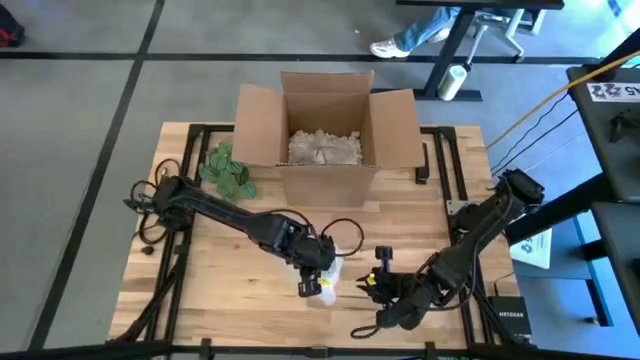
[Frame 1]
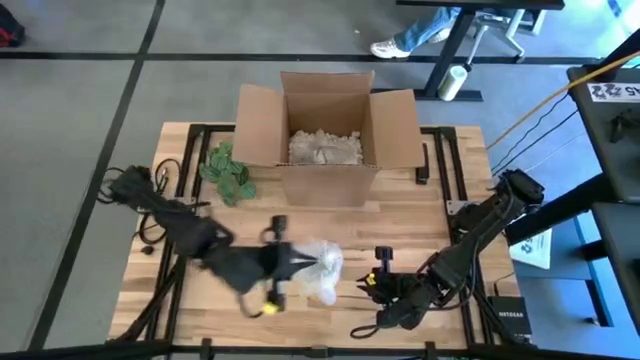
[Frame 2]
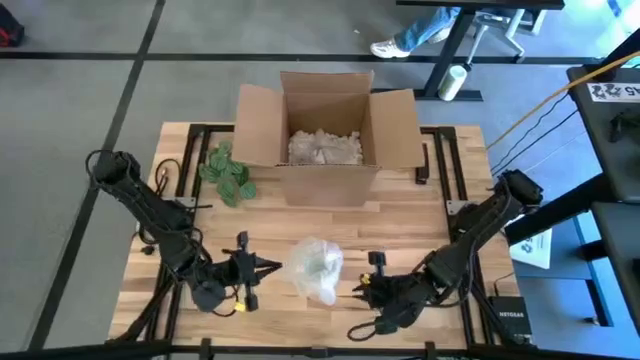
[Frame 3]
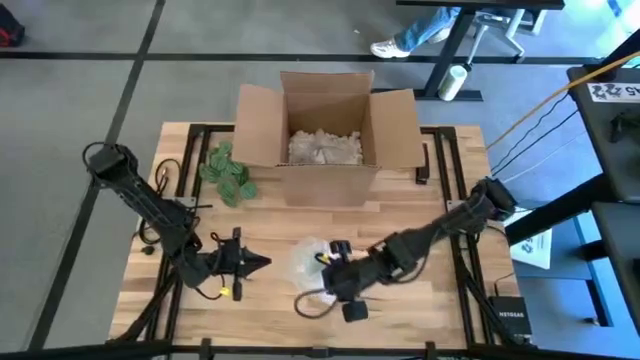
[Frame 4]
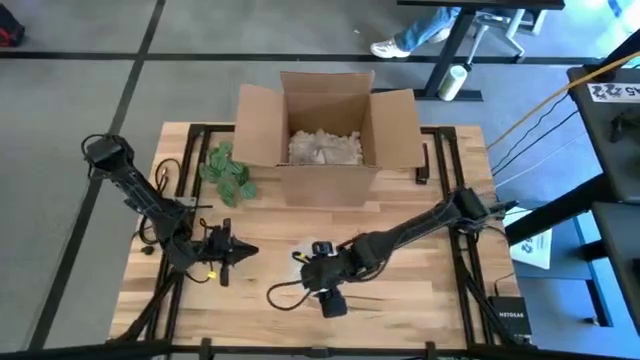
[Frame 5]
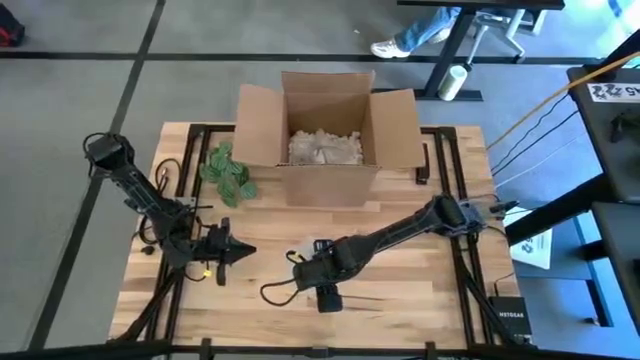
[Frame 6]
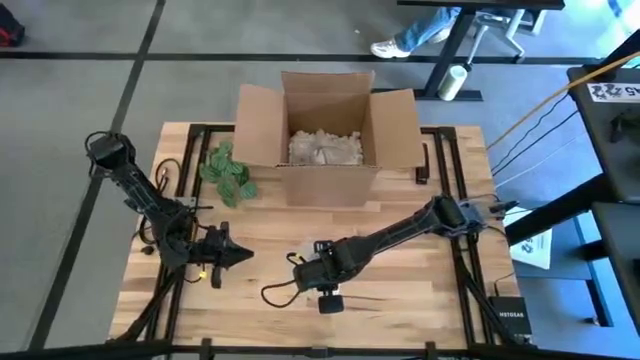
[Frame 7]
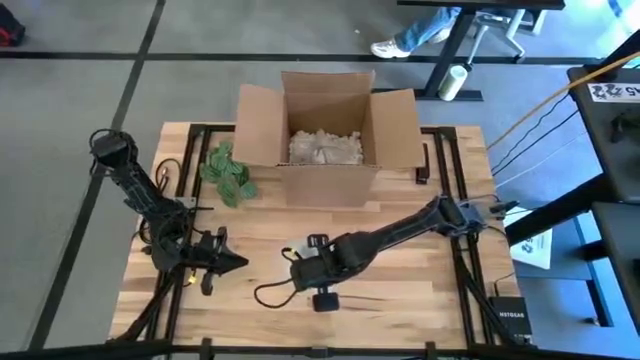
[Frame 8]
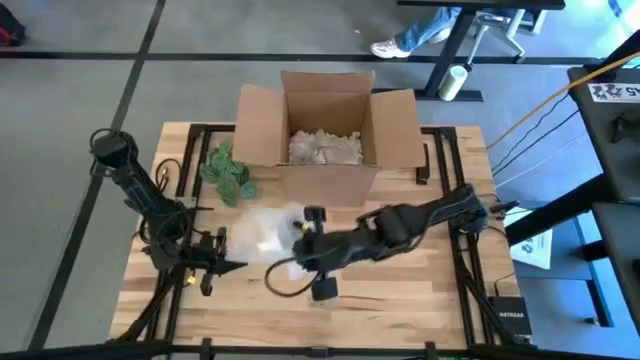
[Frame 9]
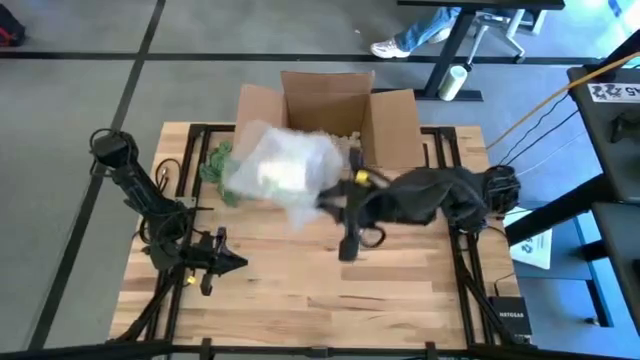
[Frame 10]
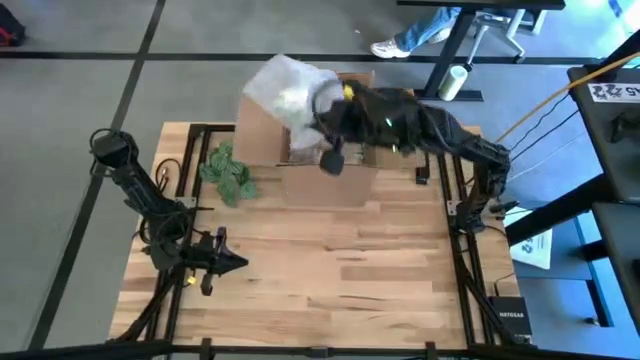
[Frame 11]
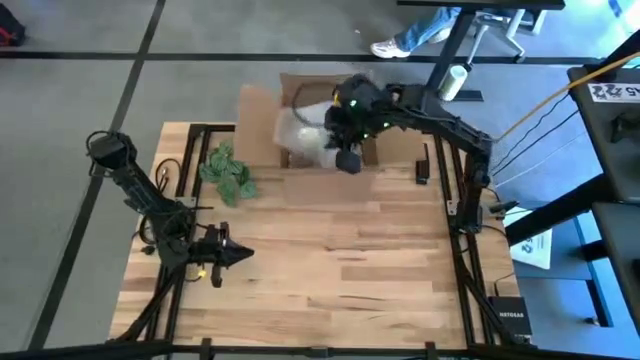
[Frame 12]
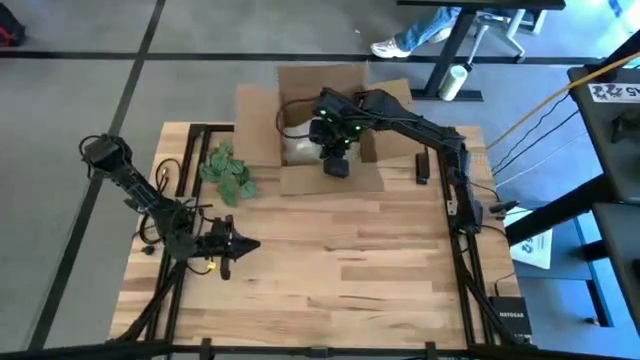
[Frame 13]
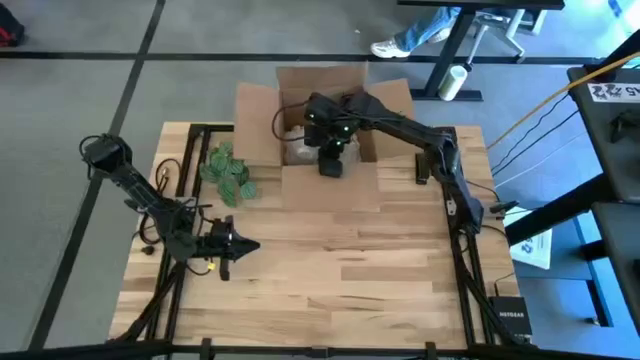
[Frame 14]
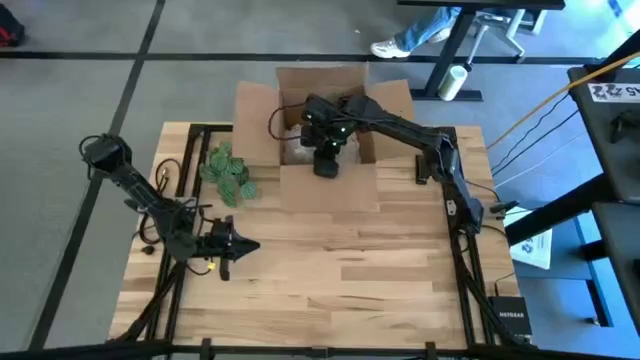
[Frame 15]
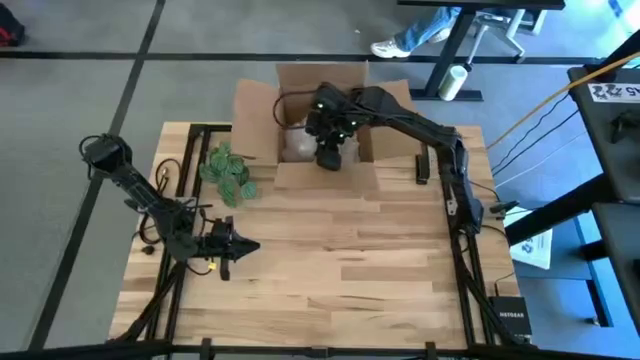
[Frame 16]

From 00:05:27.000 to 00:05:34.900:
Task: wrap mug
Put the wrapped mug into the box

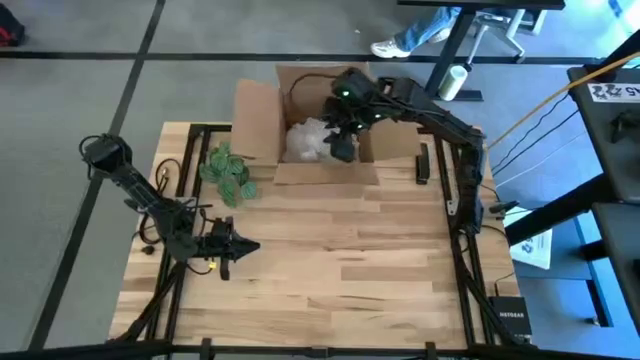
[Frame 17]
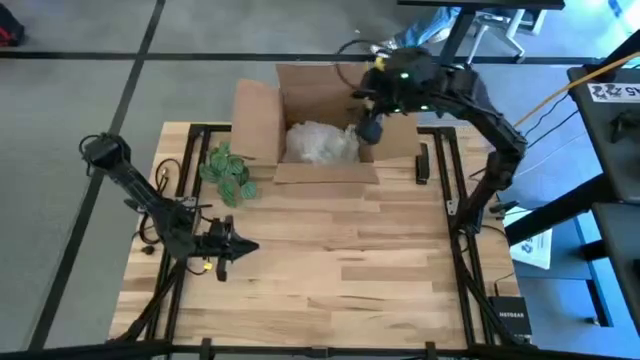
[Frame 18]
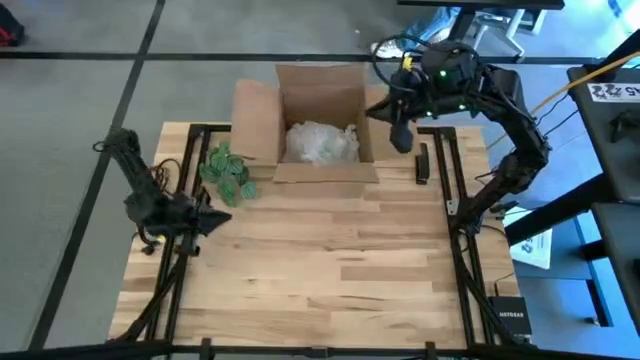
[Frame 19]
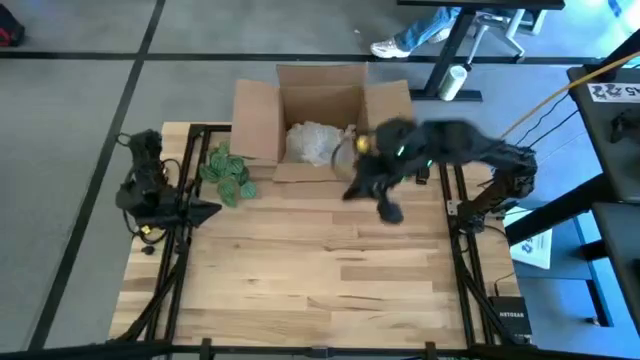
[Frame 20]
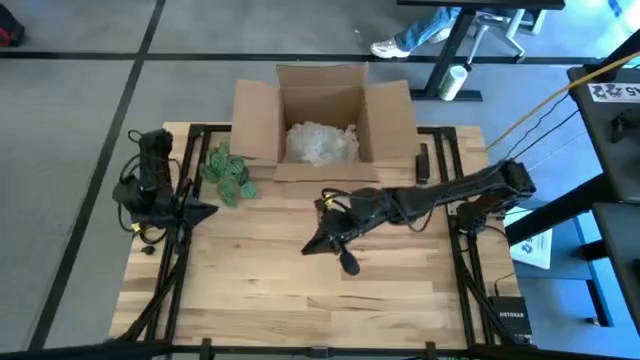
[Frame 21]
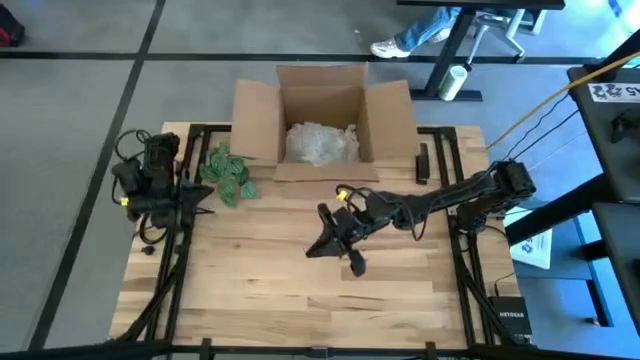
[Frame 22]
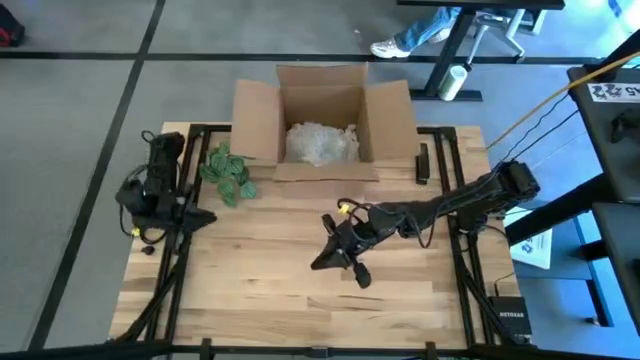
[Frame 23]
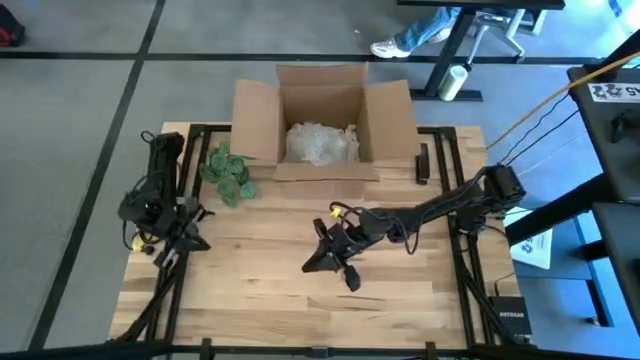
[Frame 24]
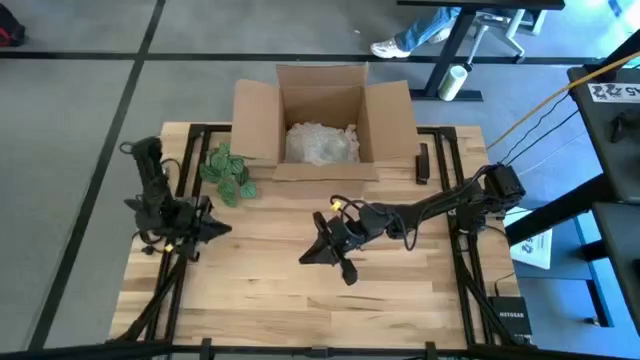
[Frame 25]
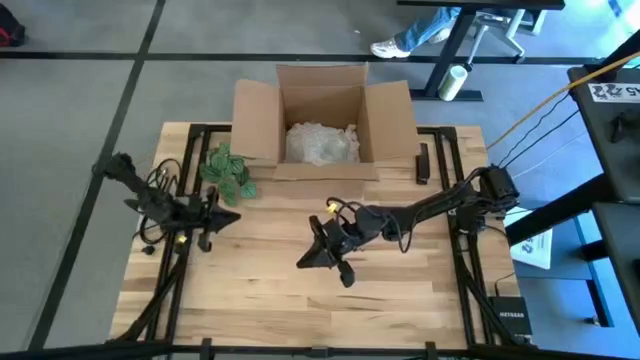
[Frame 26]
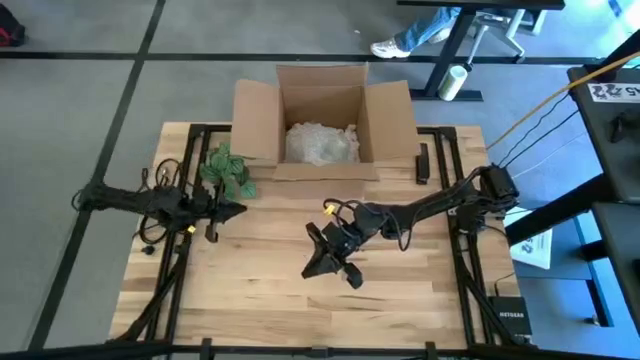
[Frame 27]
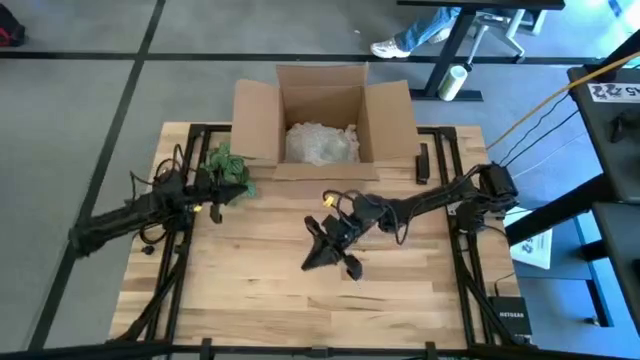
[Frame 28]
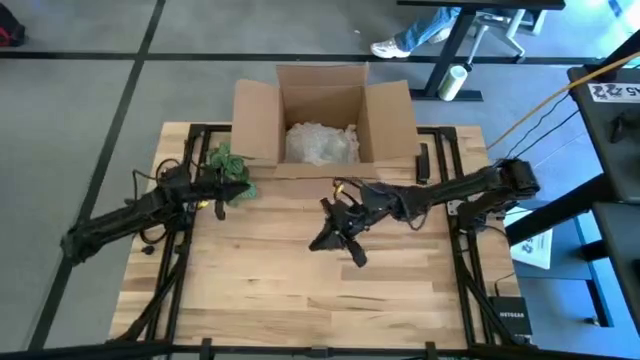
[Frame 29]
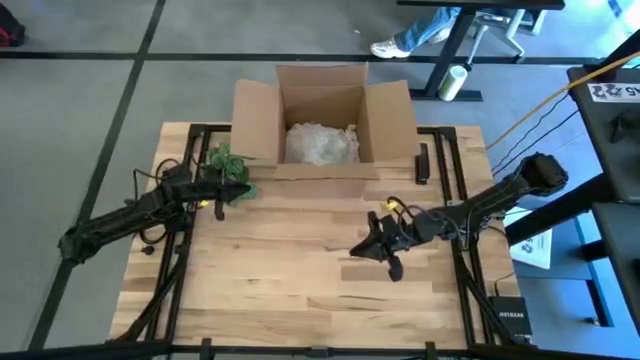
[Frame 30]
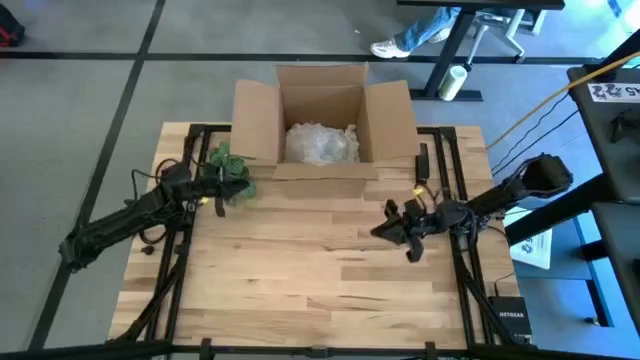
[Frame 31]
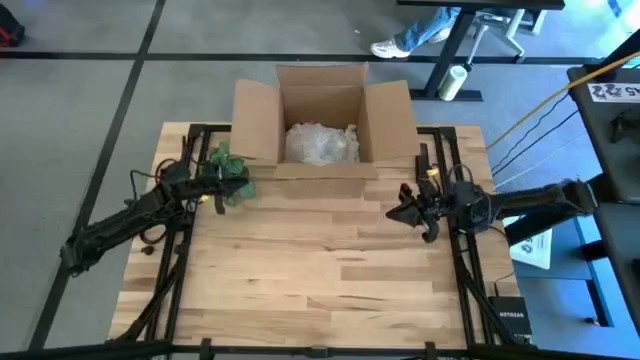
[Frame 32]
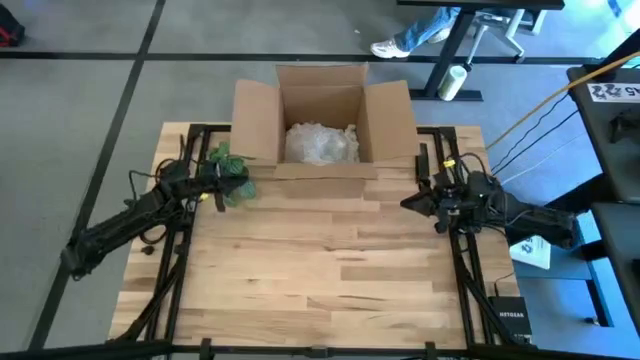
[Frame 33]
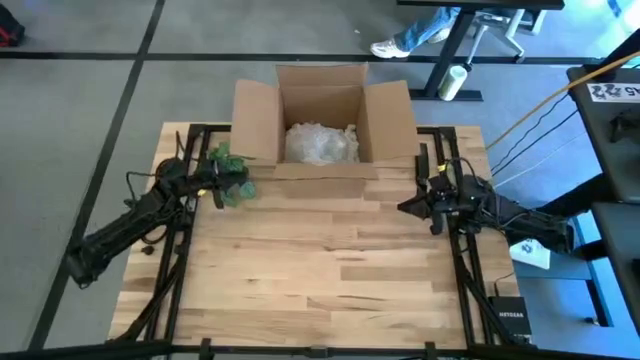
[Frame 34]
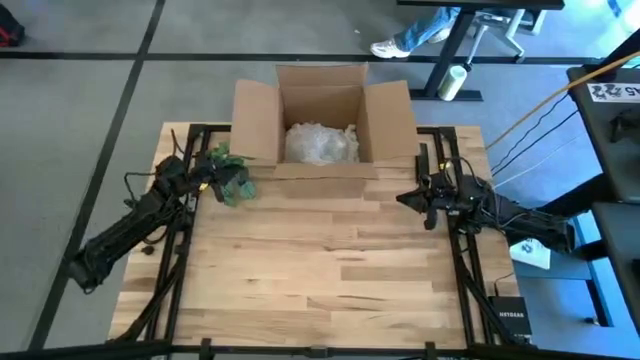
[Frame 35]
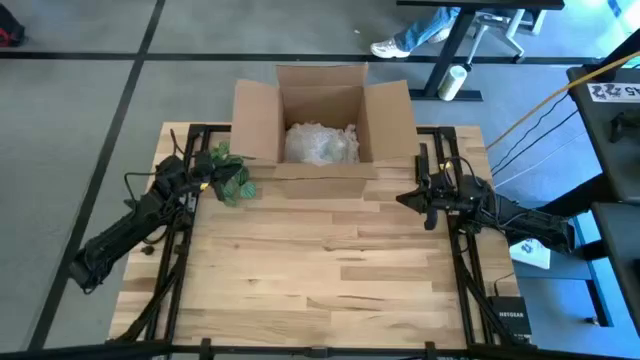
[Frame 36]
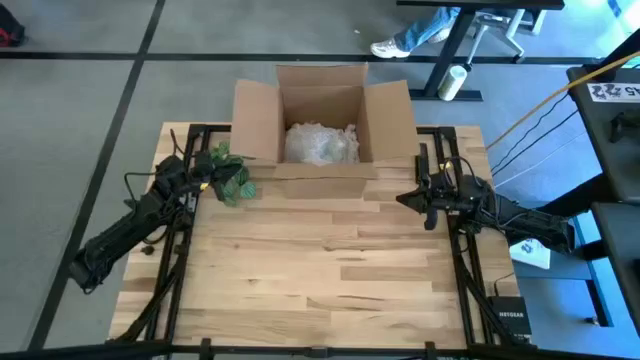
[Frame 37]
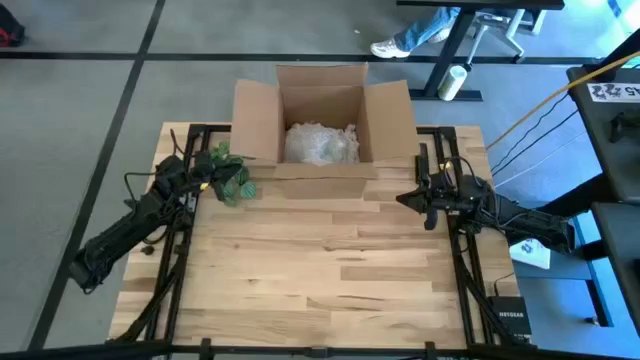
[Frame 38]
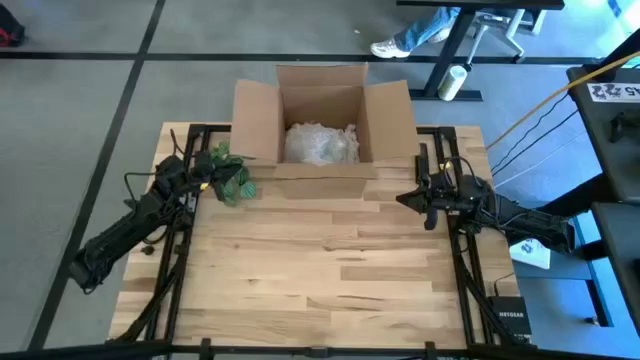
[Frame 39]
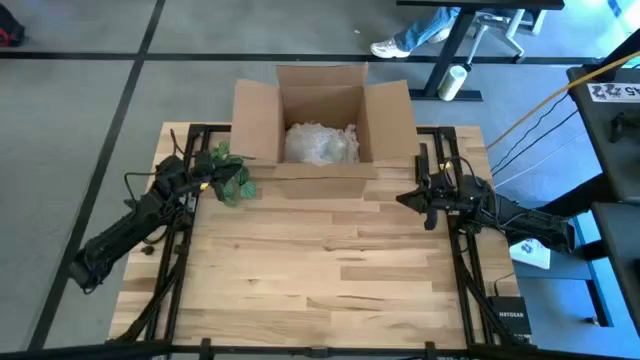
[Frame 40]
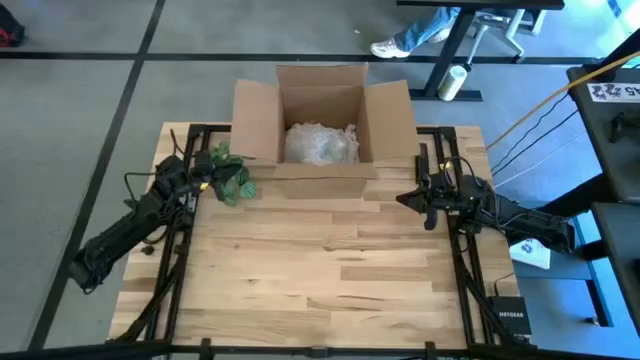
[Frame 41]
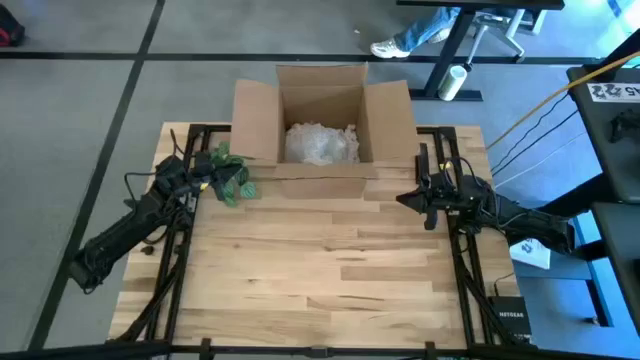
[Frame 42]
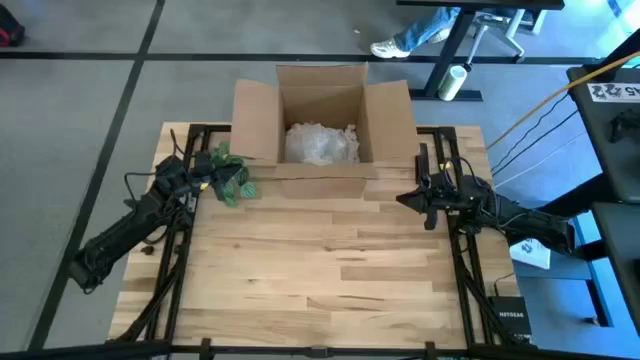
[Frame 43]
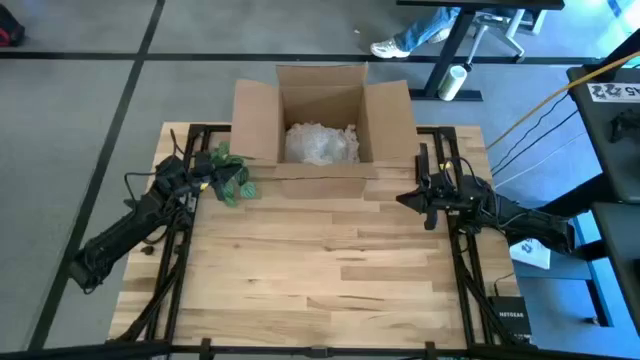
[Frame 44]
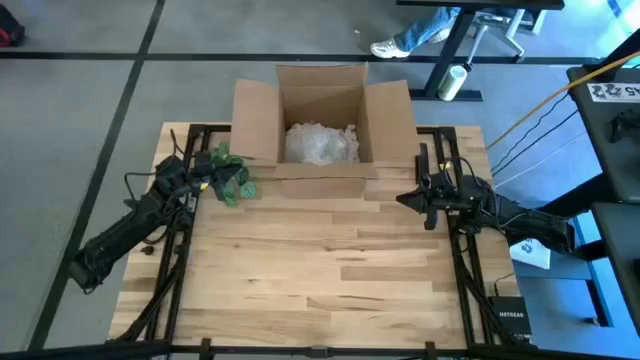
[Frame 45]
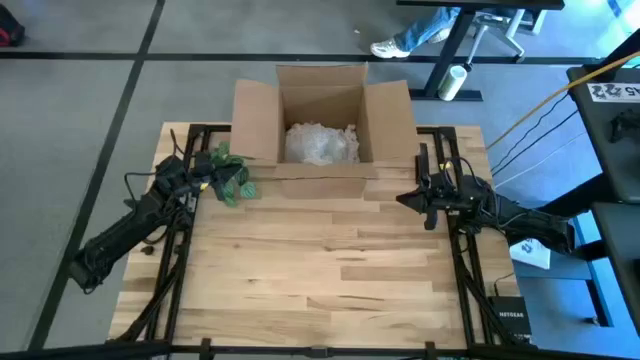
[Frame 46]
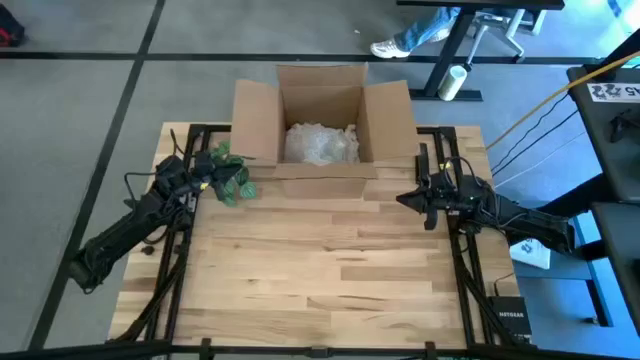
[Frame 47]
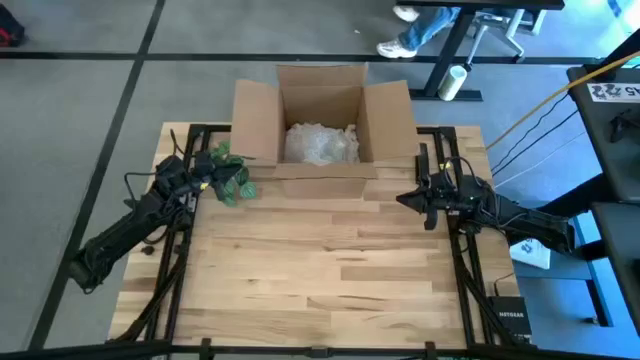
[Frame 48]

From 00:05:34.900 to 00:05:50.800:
Return to home position
